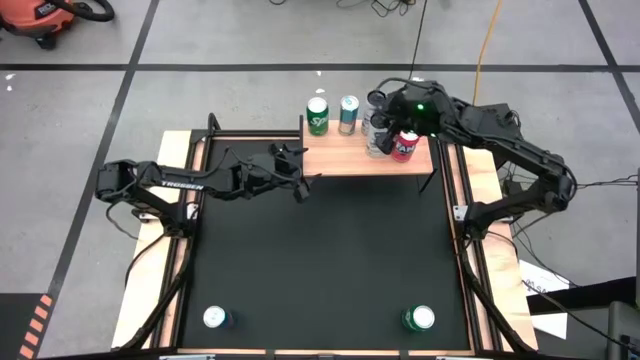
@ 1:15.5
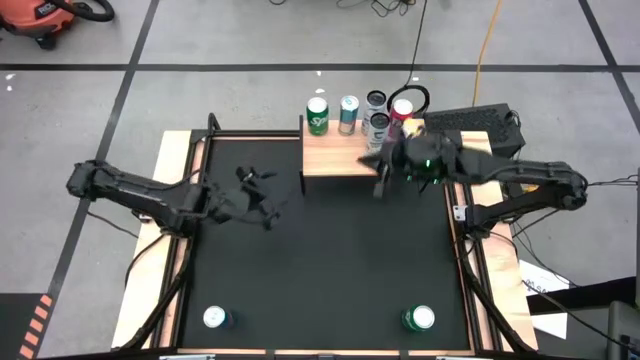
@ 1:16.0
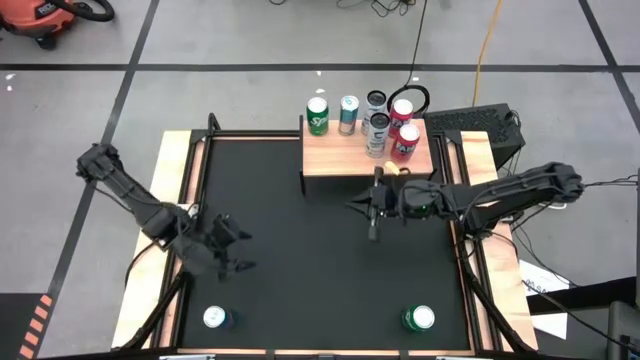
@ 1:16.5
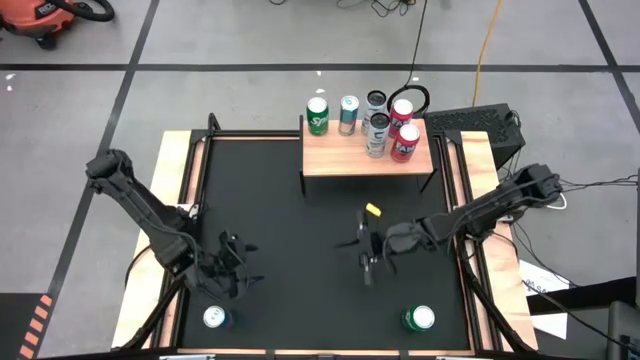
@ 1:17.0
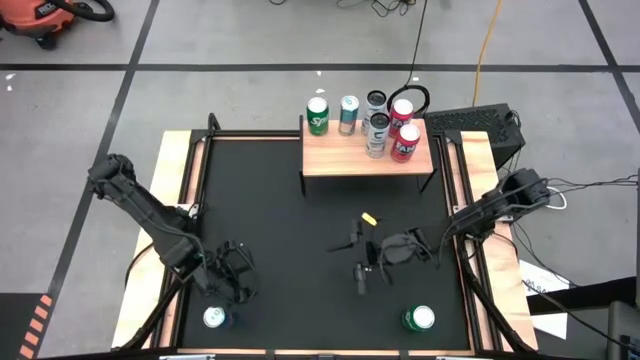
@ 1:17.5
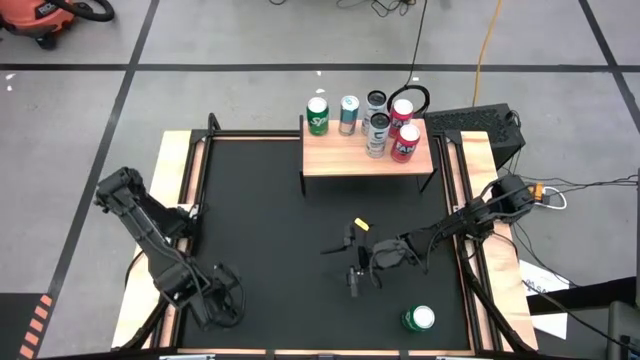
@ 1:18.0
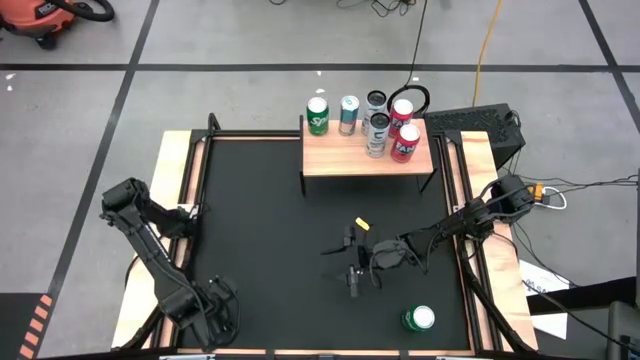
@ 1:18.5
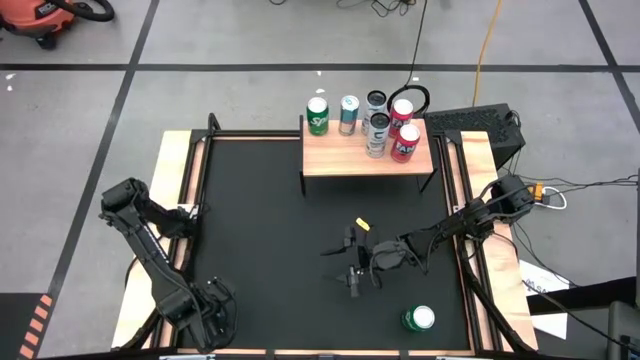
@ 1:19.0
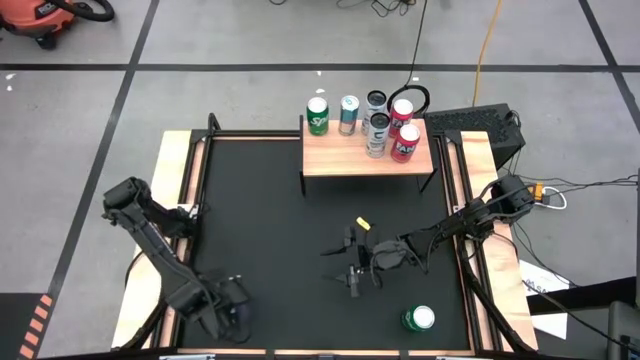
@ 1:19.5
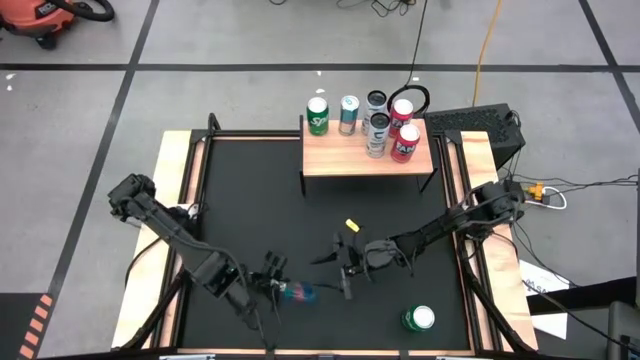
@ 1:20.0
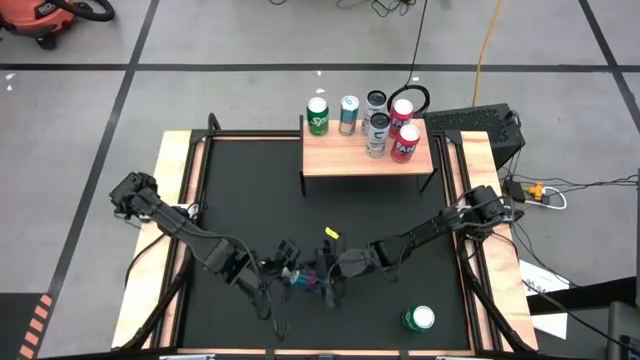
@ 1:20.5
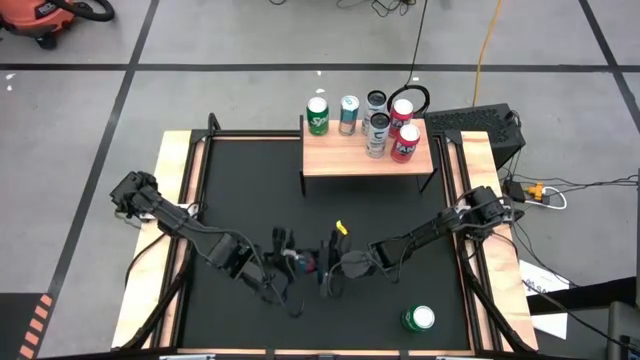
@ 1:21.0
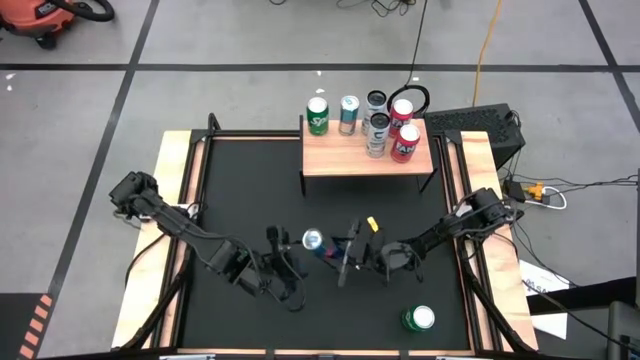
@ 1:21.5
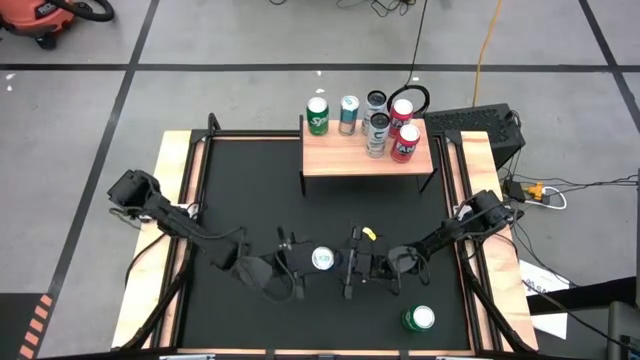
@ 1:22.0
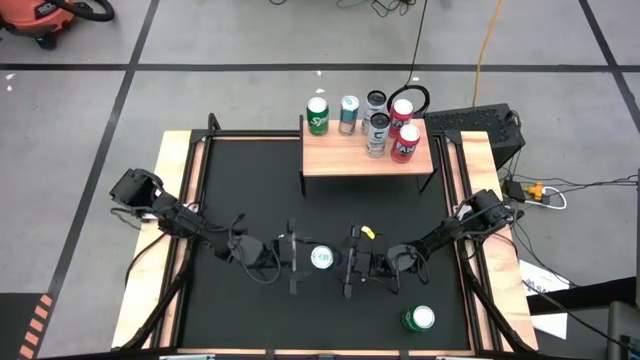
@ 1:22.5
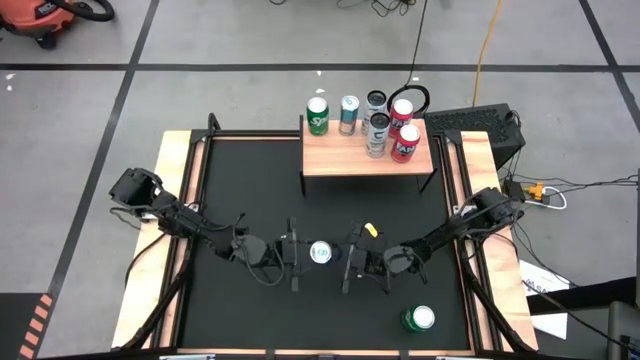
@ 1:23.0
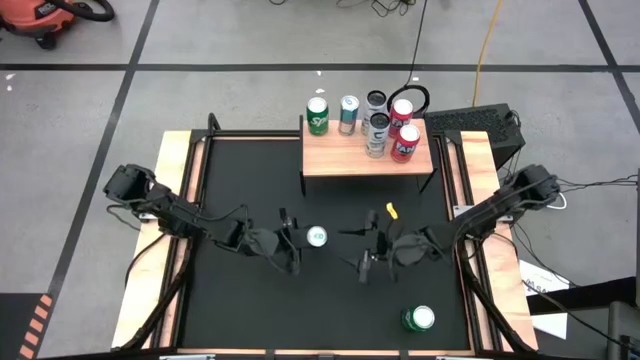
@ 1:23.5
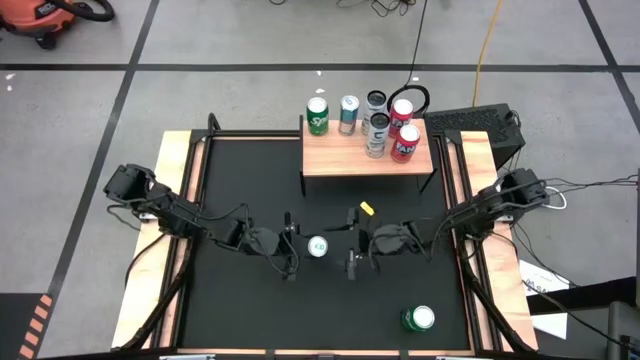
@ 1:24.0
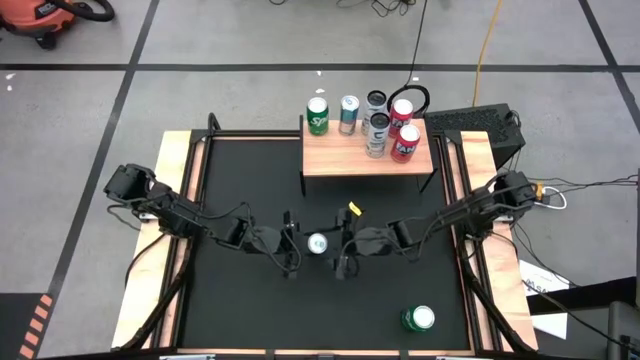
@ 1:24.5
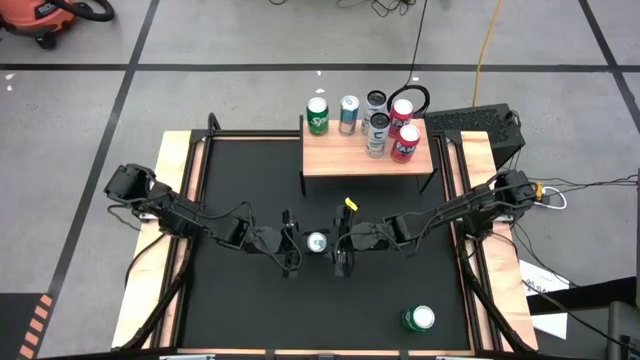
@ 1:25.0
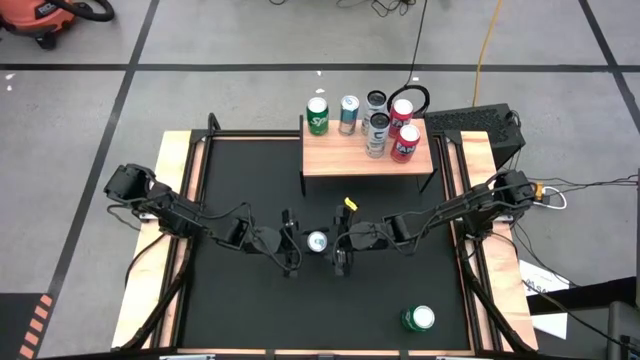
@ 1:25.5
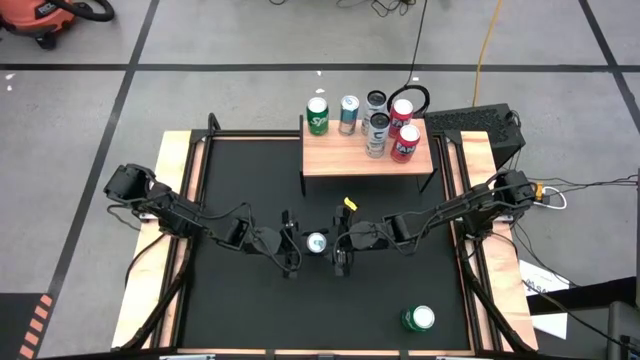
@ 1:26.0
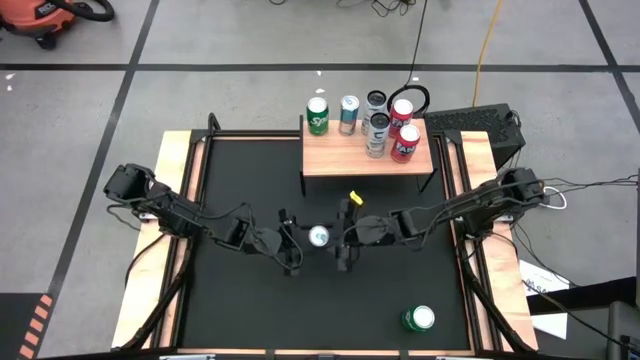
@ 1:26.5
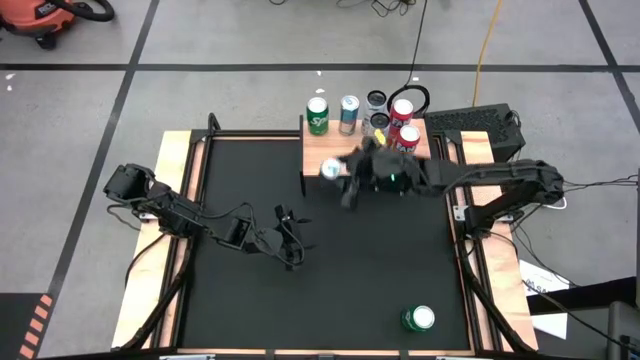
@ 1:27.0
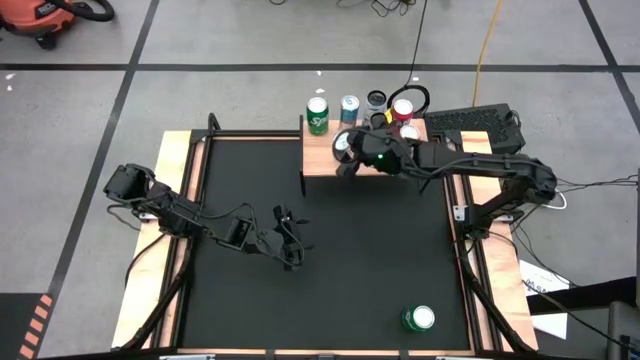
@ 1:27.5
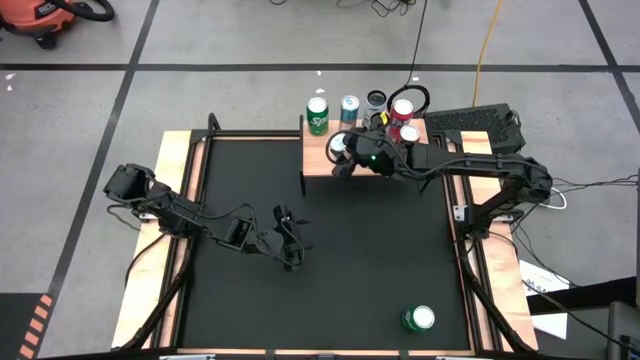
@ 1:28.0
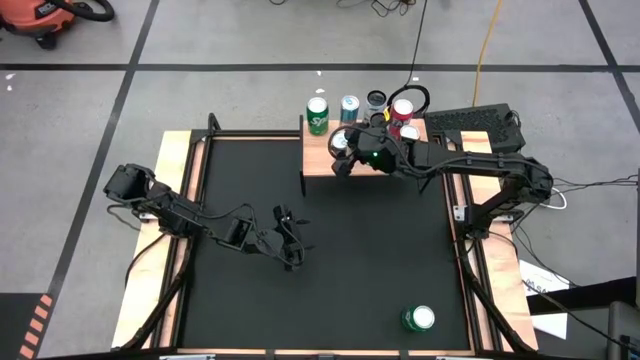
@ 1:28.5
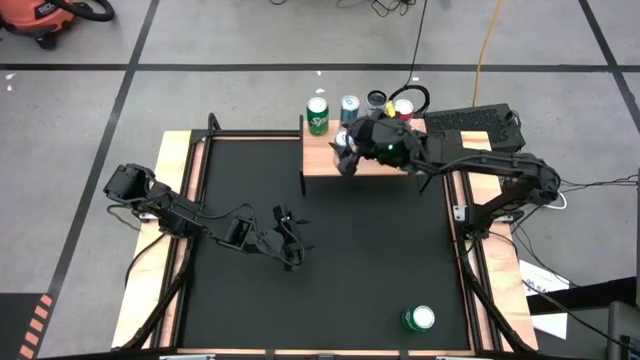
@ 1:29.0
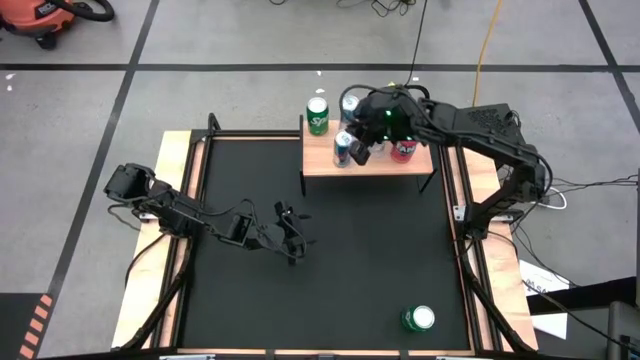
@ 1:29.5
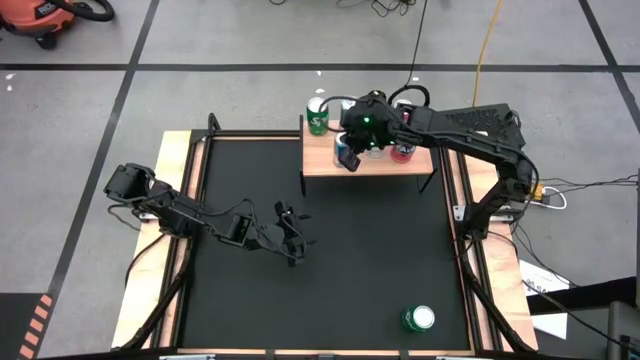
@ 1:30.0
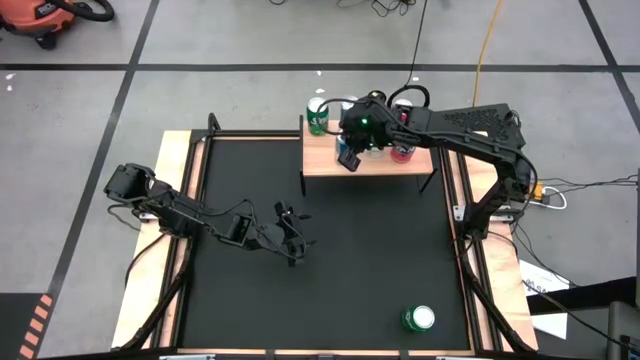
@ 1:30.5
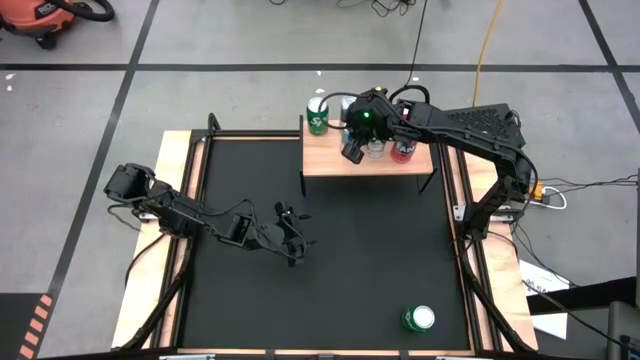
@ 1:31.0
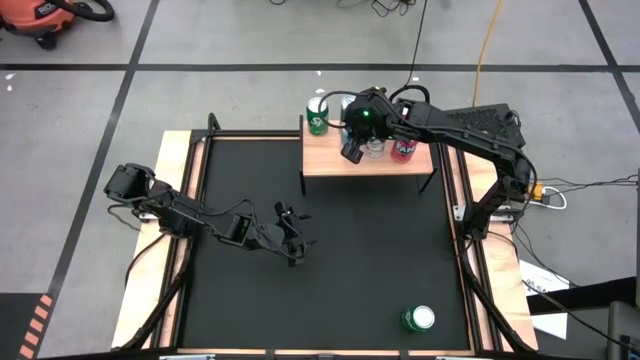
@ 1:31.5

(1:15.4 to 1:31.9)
Task: Place canned beverage on shelf
Put the blue soda can on the shelf aligned with the other blue soda can

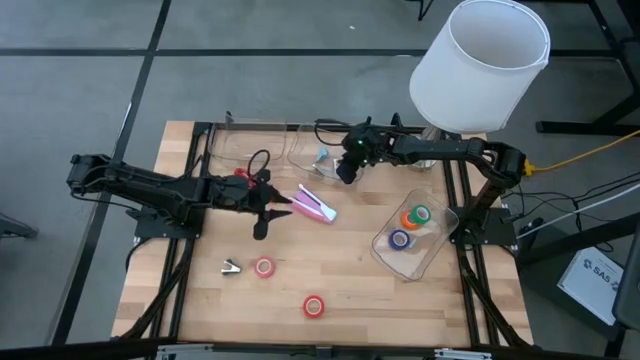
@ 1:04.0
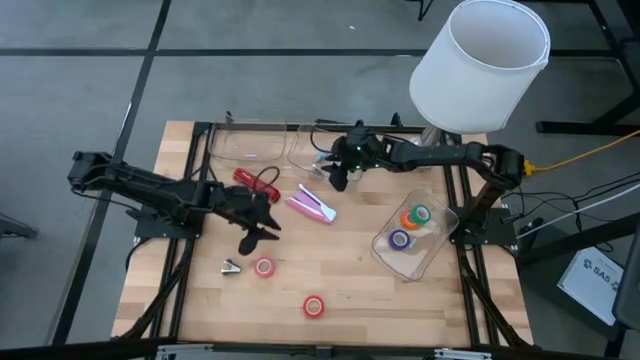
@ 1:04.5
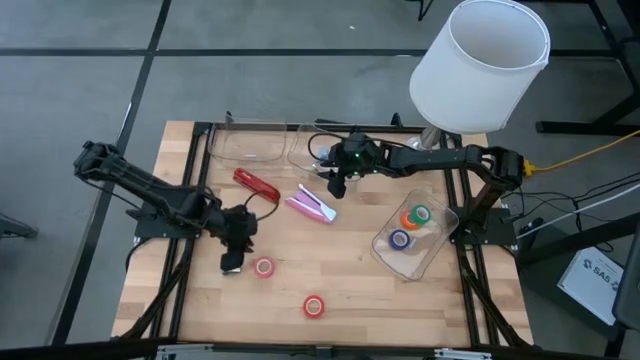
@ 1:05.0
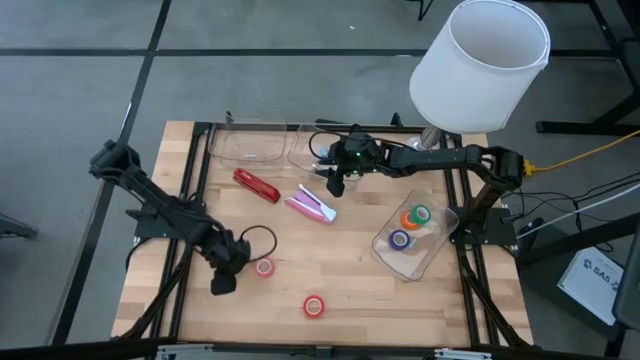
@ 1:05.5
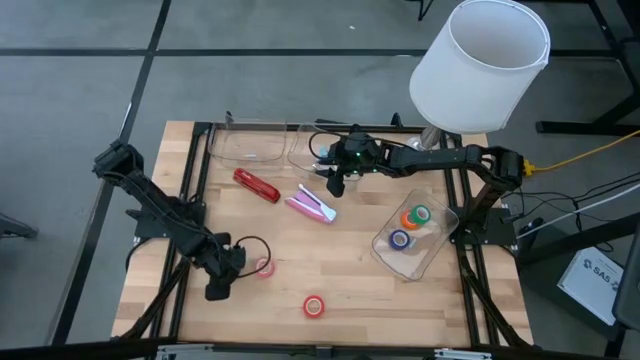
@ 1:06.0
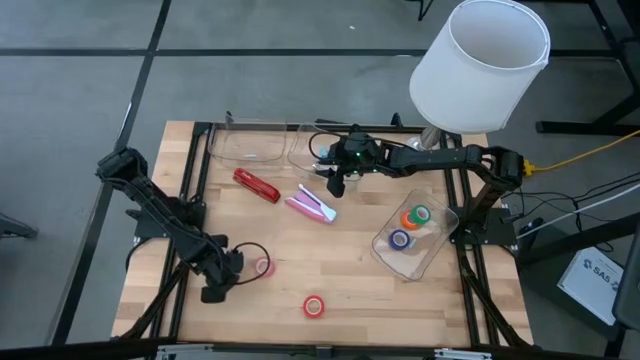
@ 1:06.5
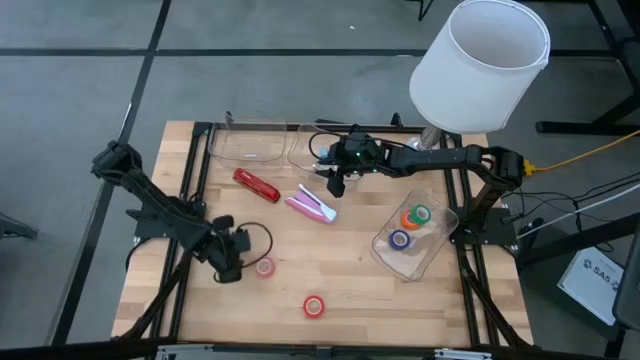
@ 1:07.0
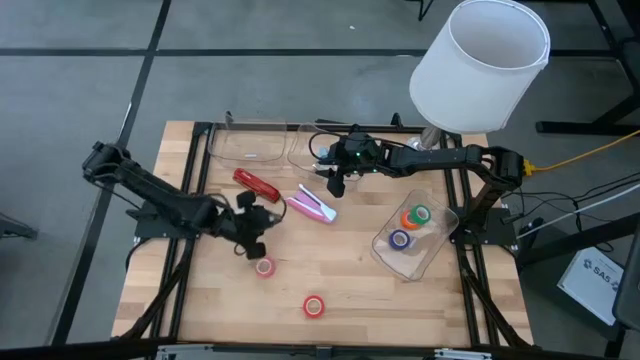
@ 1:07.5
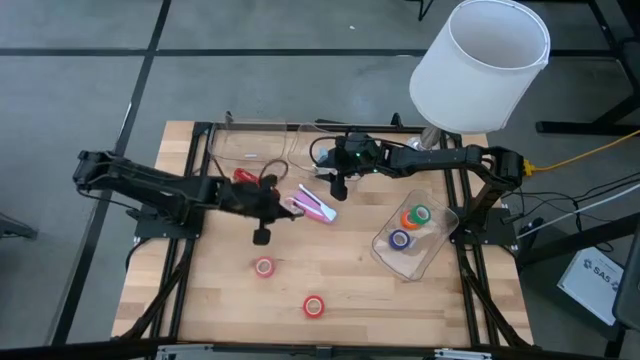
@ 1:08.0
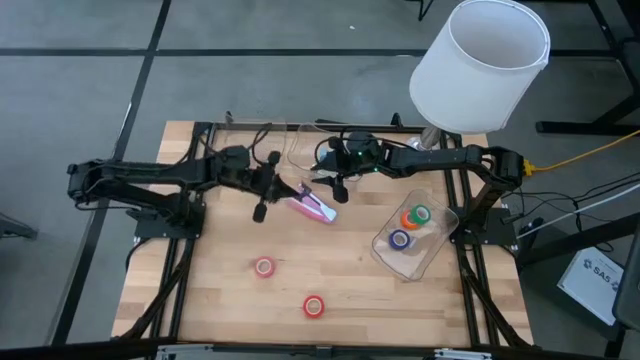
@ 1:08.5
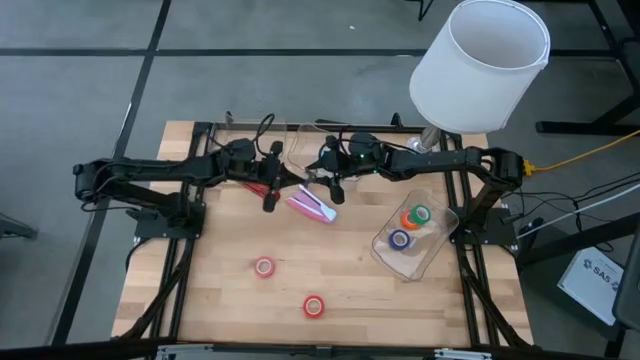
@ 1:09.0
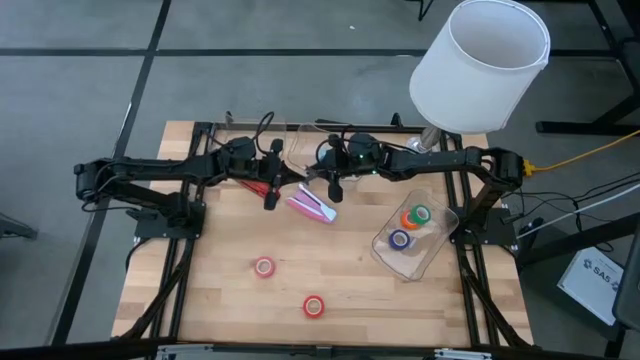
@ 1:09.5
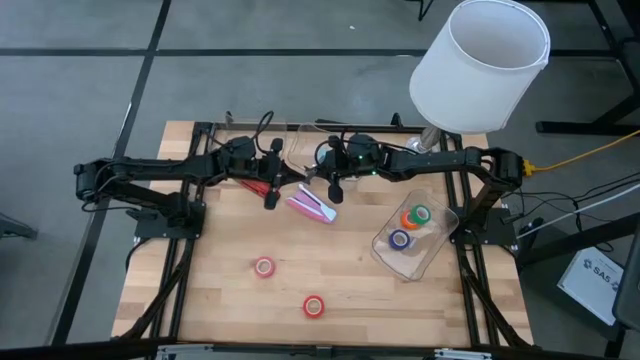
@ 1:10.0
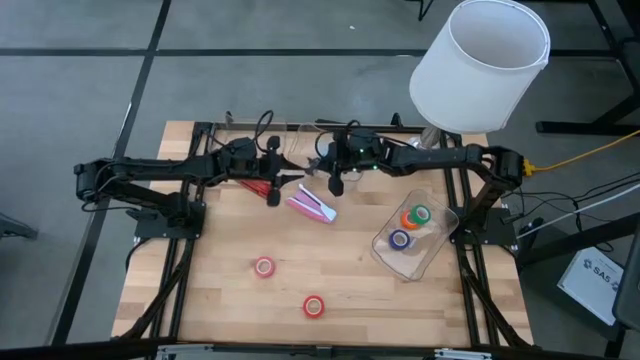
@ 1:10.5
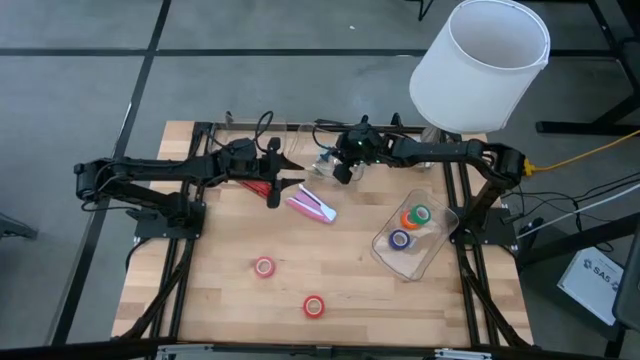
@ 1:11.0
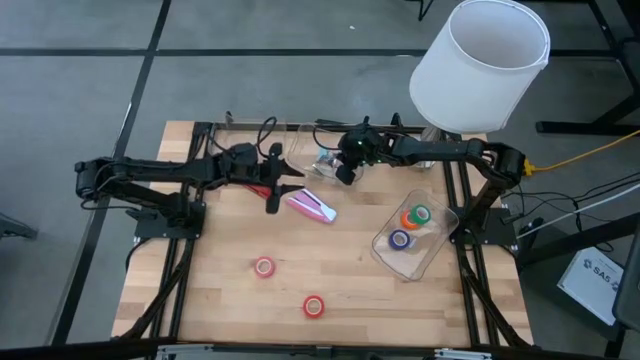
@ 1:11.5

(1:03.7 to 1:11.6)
Task: Pick and place Stapler, Stapler remover, tape
Put the black staple remover into the top right transparent bin
